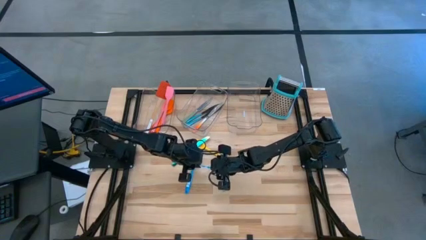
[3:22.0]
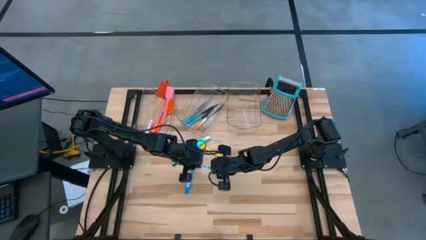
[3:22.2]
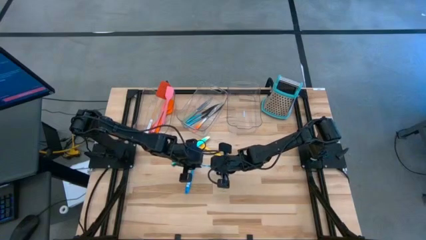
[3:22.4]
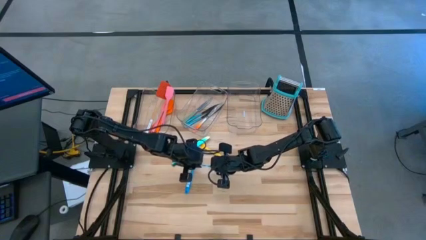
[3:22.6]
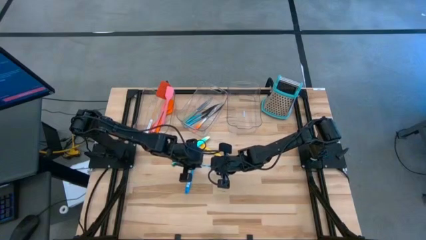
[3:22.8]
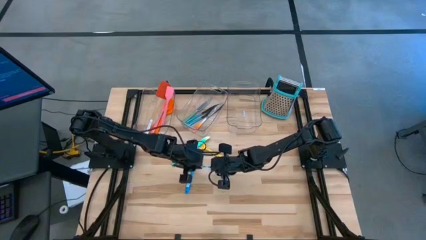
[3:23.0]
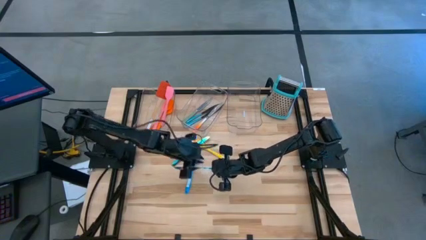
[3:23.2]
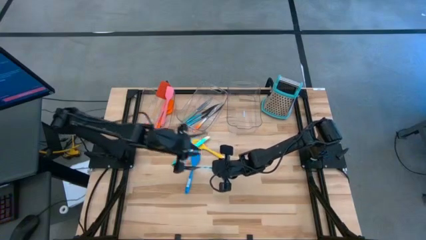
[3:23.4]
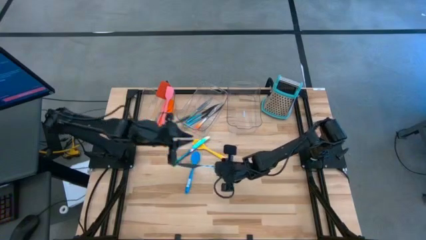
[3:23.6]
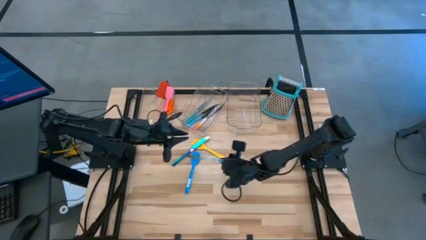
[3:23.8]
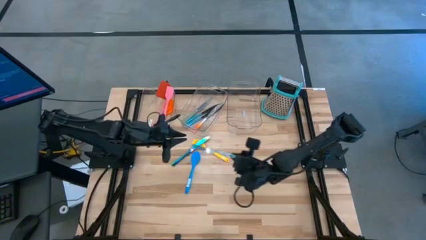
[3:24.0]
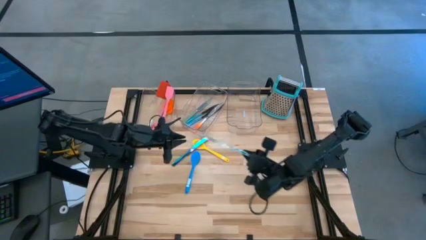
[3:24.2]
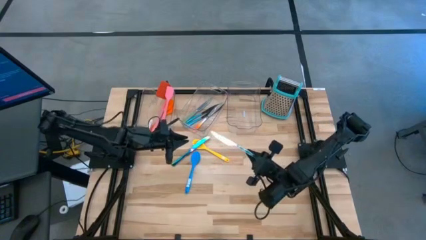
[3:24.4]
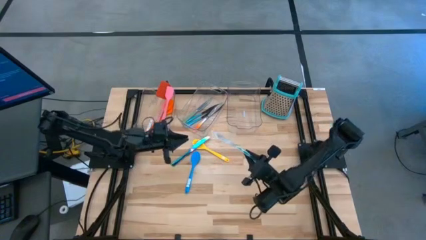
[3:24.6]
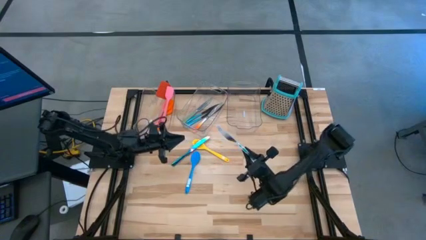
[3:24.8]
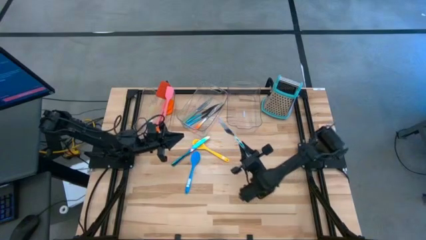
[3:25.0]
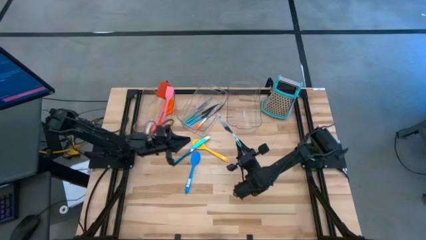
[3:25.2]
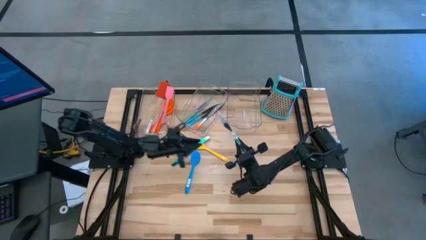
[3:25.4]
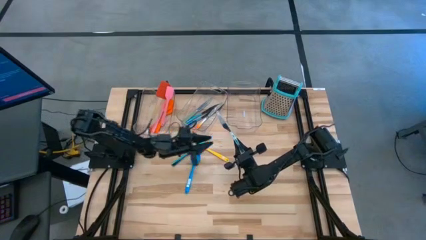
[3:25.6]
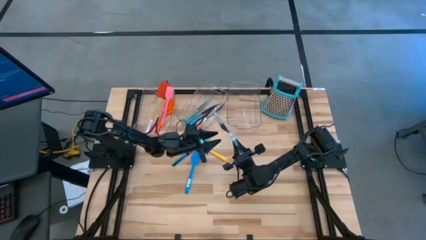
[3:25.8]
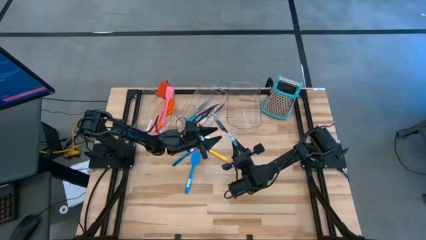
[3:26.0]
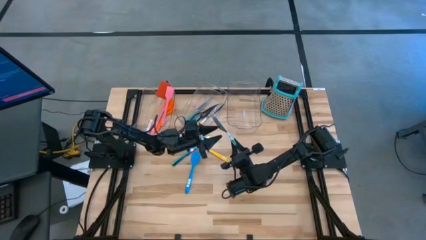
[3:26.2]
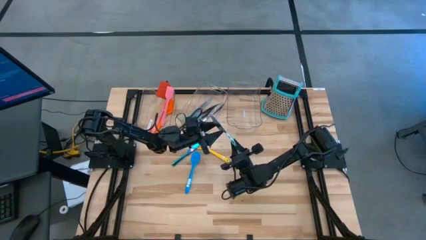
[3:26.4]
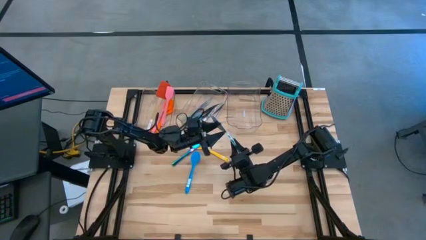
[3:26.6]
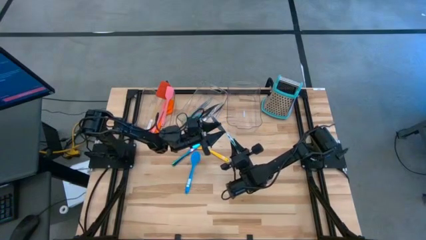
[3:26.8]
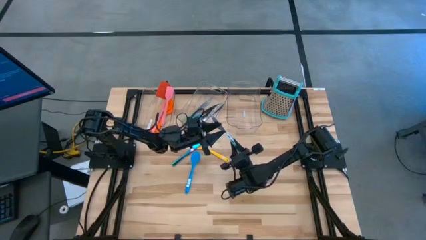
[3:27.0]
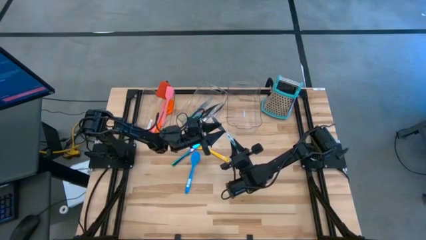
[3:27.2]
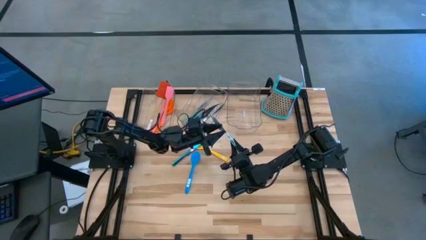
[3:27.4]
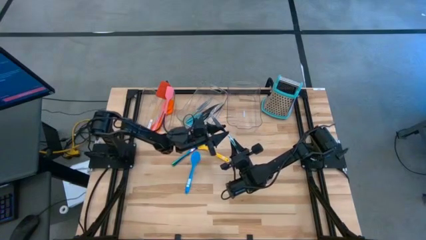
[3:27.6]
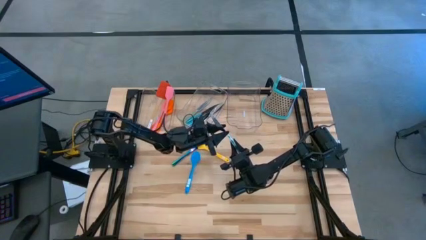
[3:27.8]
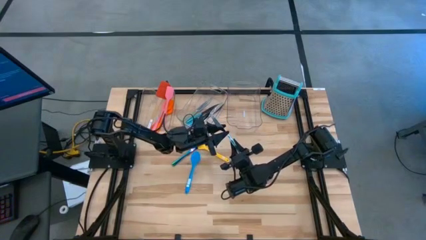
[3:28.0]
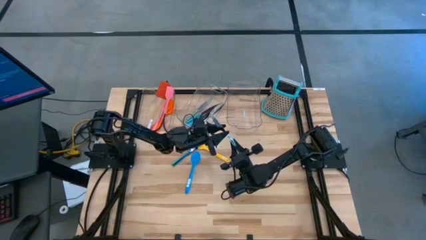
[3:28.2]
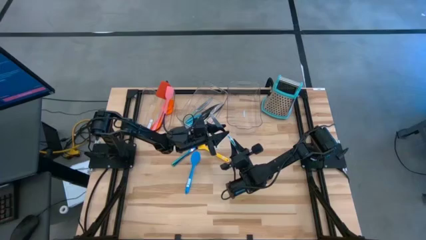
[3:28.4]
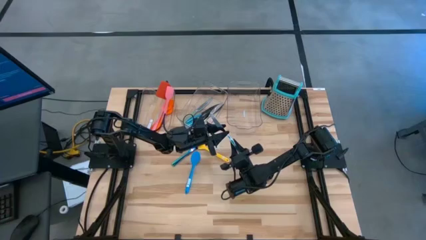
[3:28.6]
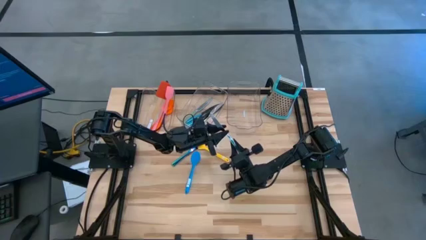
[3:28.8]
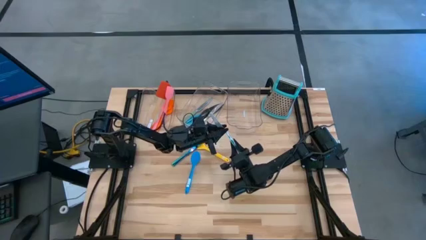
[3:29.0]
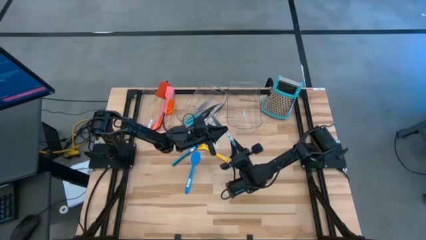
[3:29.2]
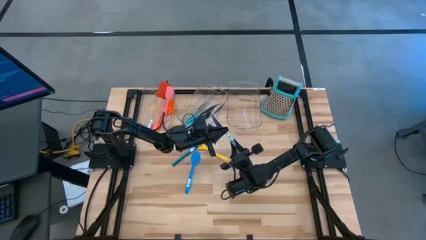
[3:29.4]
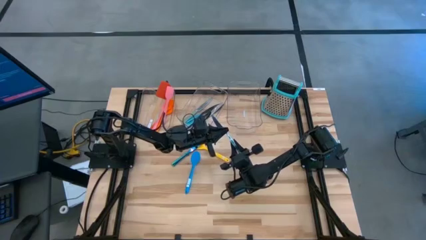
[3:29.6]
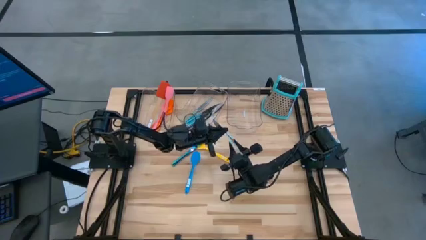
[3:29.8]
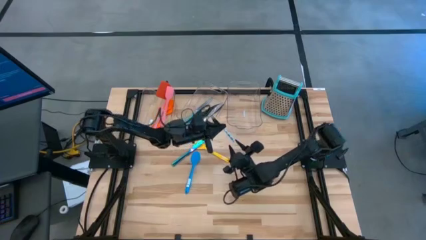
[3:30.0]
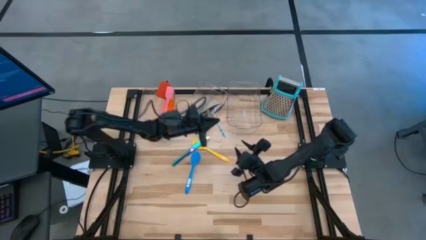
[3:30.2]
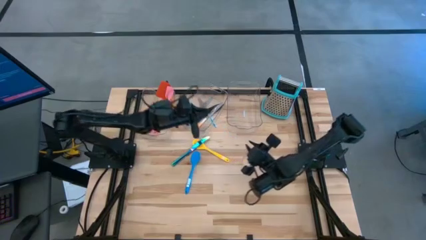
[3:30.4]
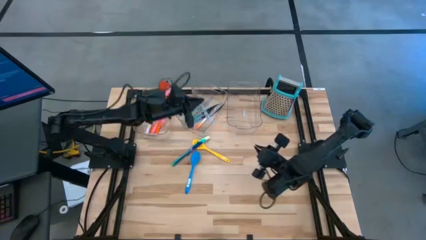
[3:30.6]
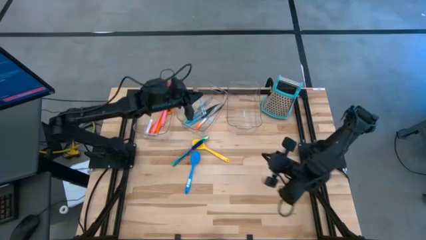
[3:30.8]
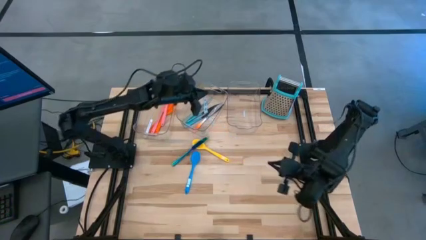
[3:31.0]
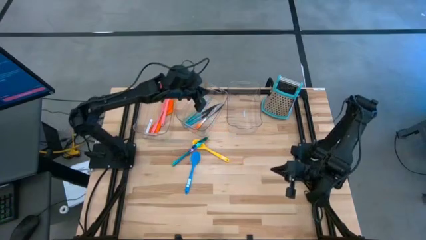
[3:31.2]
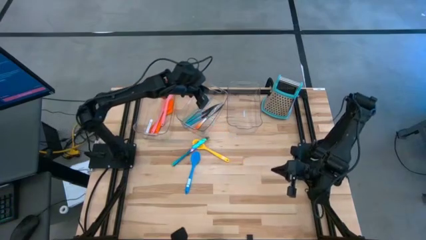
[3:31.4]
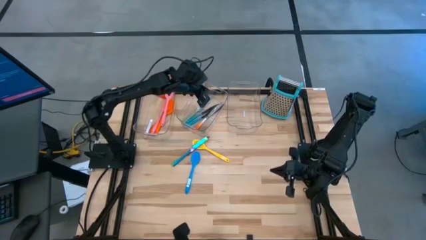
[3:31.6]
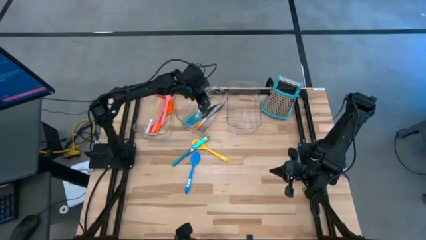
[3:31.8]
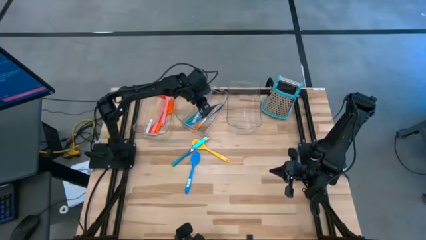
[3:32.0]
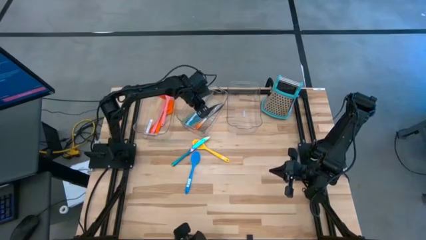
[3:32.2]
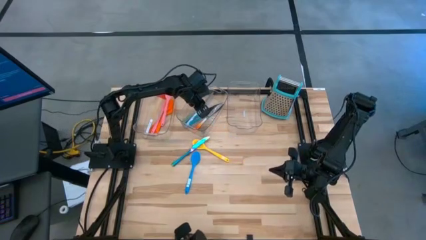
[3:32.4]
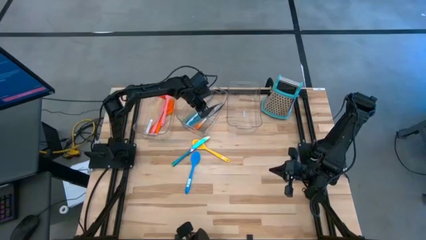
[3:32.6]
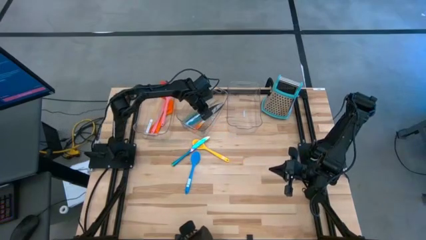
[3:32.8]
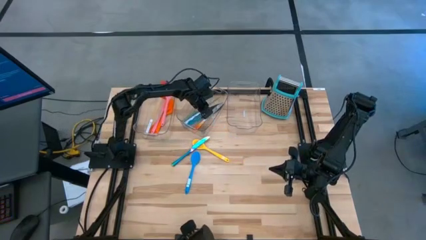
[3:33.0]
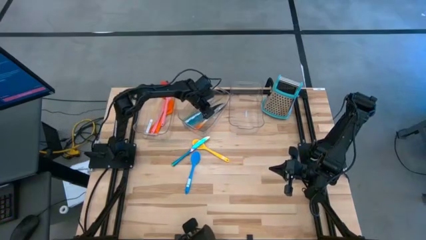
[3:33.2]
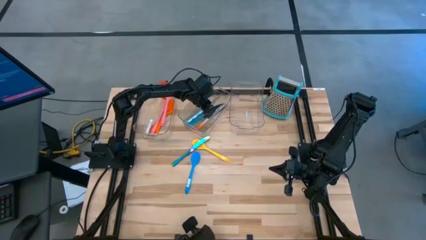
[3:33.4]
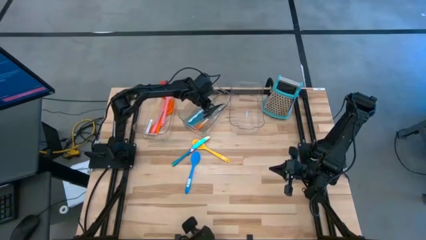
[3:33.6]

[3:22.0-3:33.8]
Task: Pick & Place Kitchen Items
Put the white patterned knife into the middle transparent bin

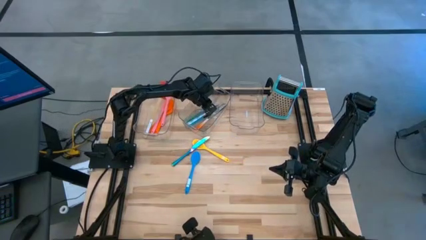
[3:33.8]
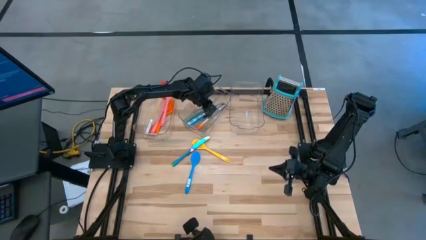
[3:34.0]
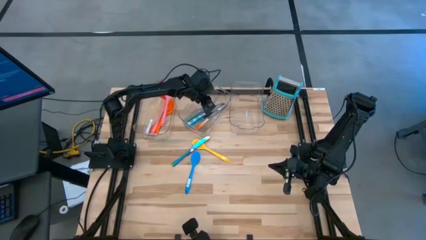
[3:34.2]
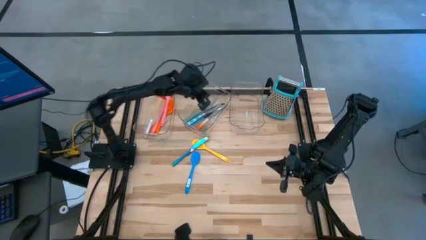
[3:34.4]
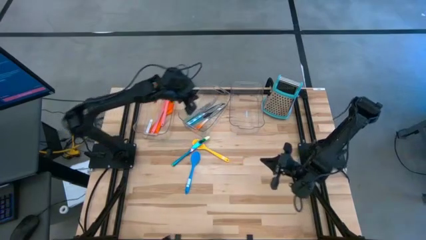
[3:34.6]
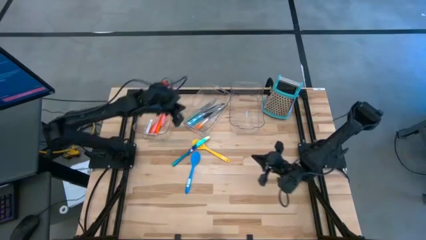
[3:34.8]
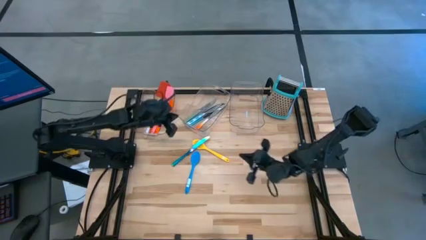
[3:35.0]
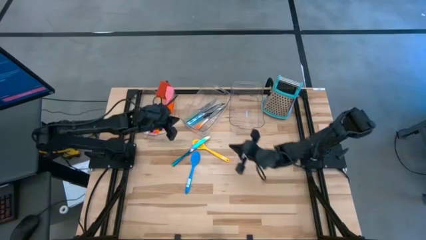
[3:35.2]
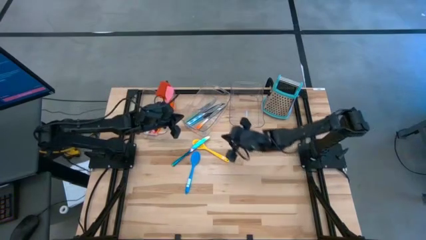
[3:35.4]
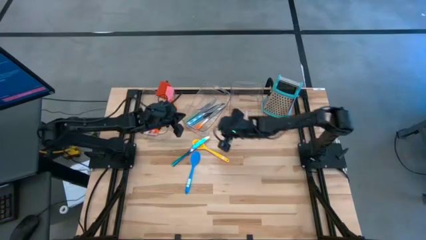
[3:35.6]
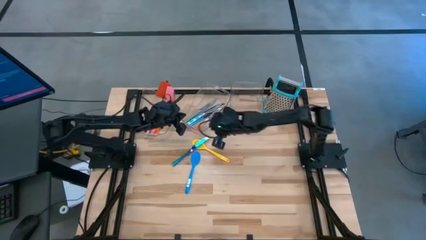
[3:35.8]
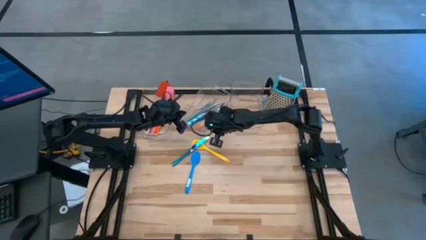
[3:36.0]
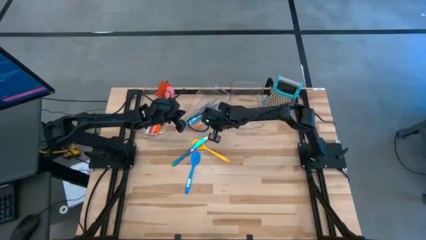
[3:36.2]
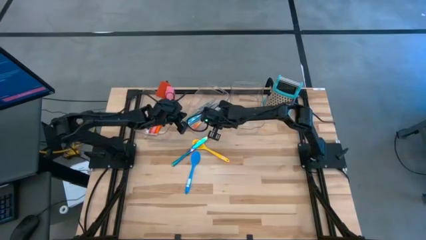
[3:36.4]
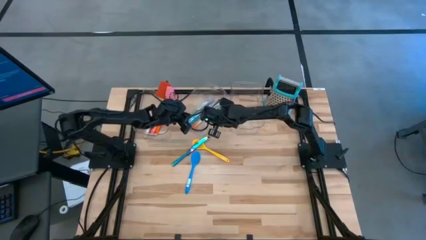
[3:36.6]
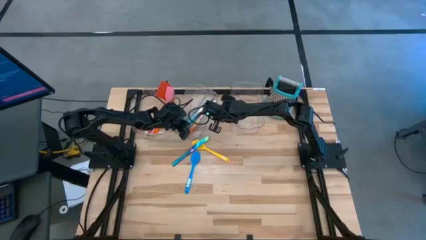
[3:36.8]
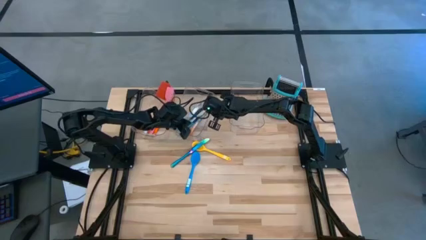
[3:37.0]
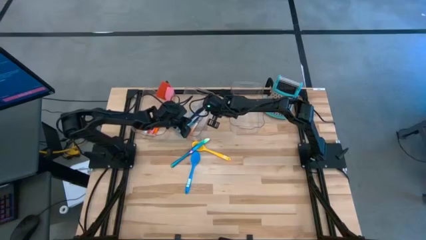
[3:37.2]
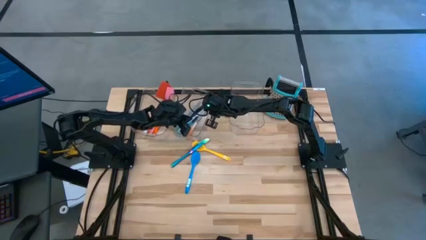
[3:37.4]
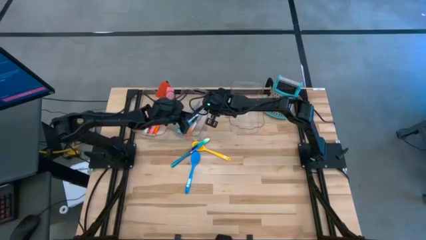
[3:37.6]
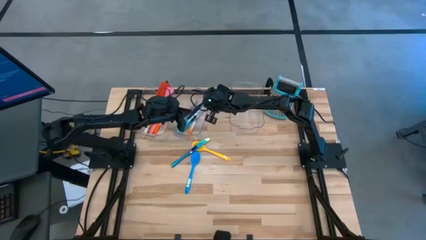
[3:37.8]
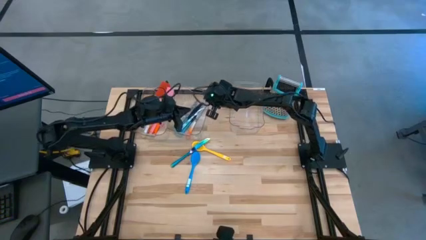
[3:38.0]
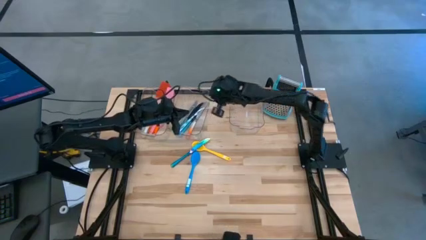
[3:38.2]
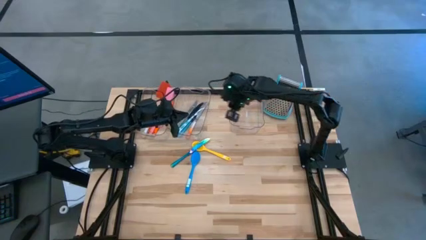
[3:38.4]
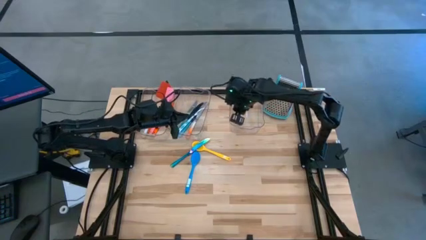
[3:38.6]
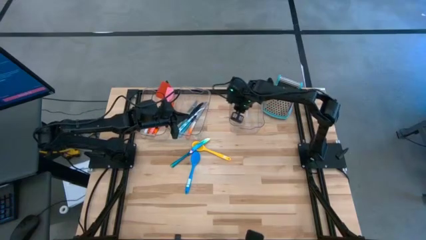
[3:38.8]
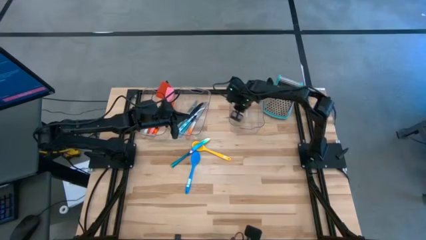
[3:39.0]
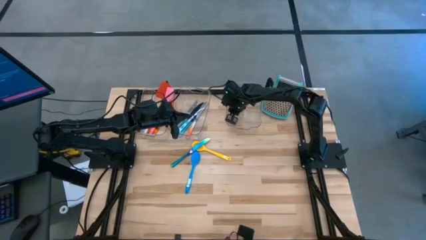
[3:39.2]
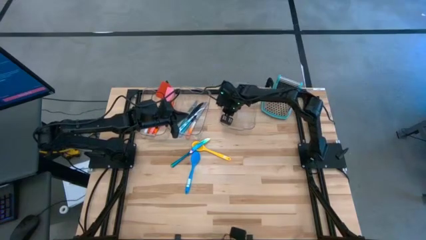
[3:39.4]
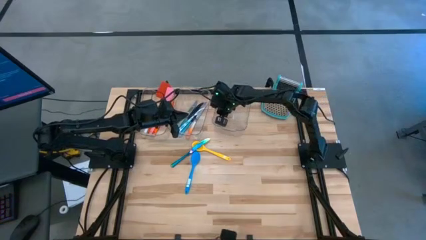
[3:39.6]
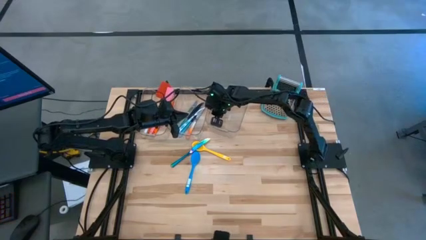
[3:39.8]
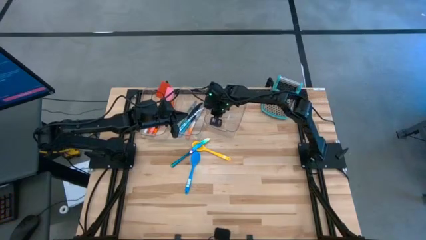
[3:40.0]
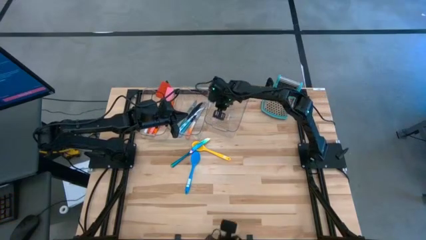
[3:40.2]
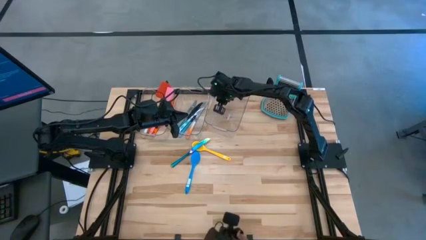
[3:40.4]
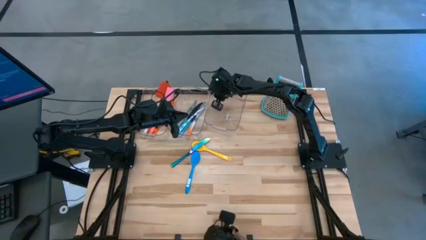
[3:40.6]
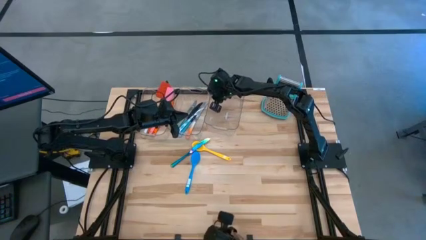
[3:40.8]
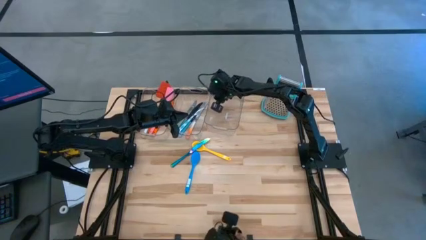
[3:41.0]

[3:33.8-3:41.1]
Adjust the transparent bins on the table
